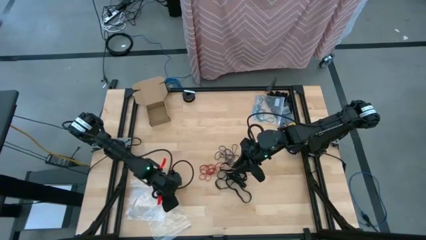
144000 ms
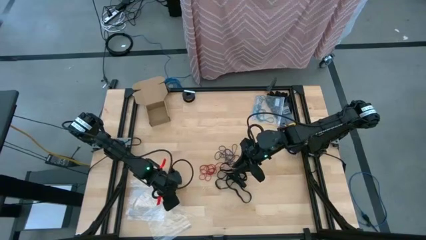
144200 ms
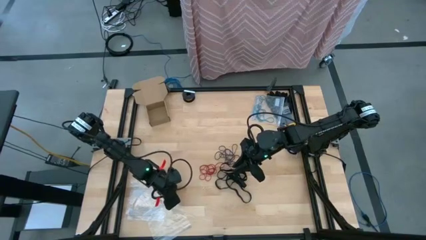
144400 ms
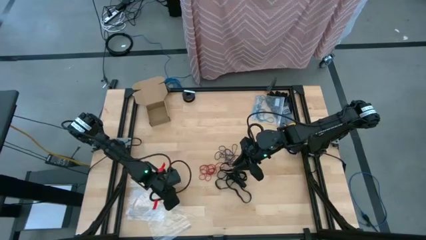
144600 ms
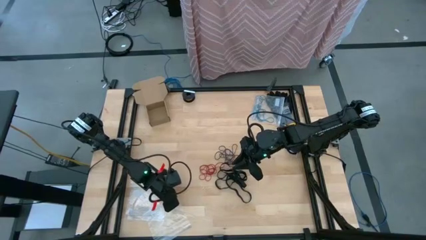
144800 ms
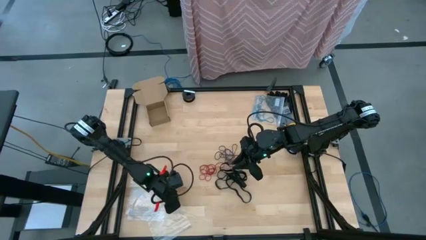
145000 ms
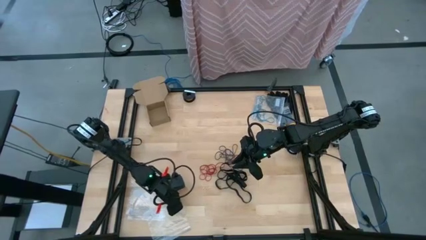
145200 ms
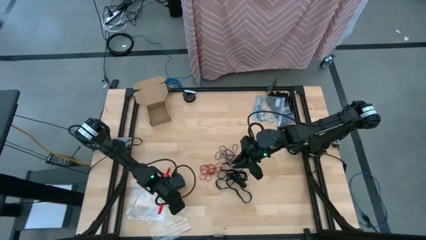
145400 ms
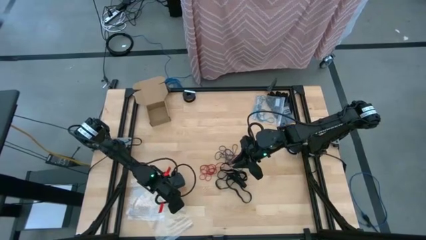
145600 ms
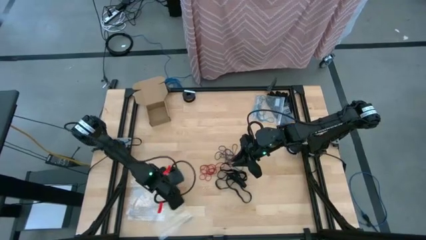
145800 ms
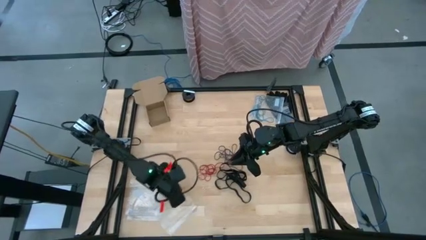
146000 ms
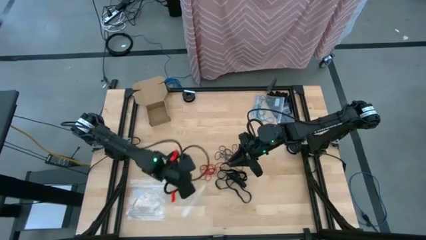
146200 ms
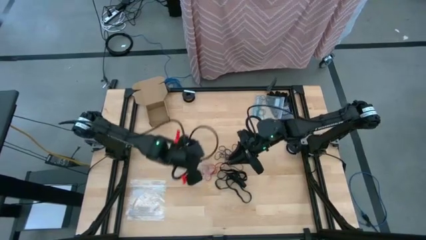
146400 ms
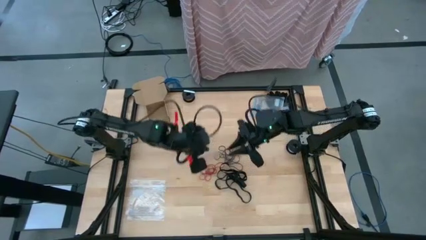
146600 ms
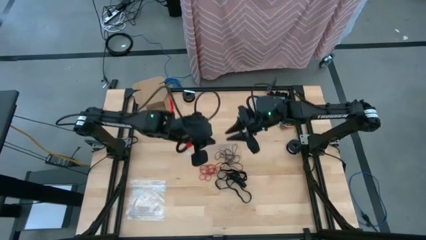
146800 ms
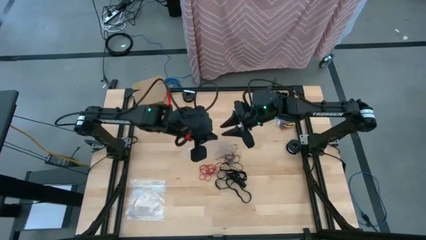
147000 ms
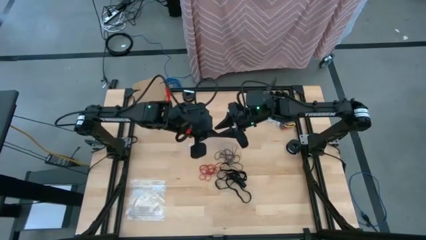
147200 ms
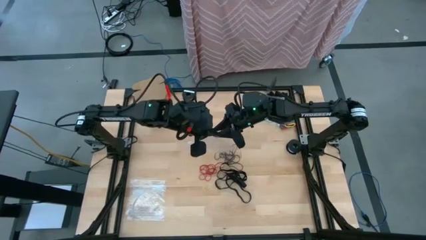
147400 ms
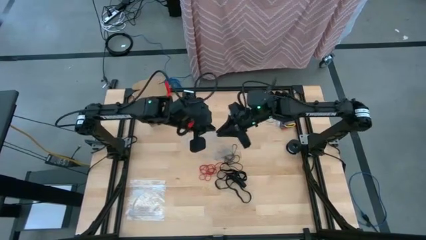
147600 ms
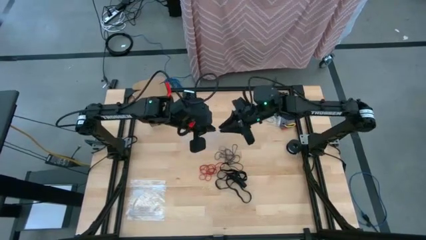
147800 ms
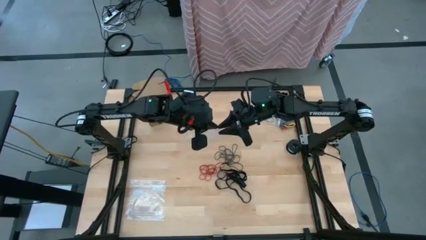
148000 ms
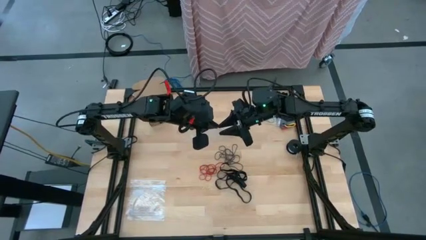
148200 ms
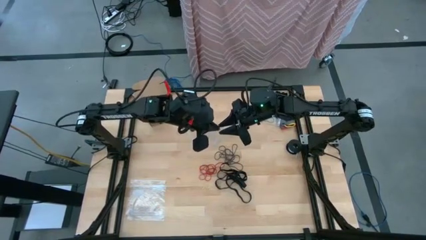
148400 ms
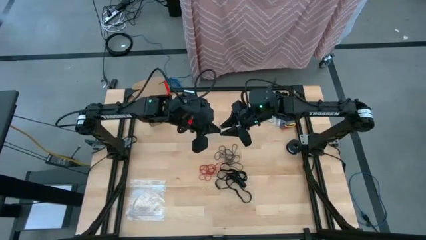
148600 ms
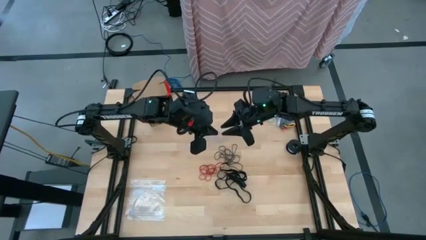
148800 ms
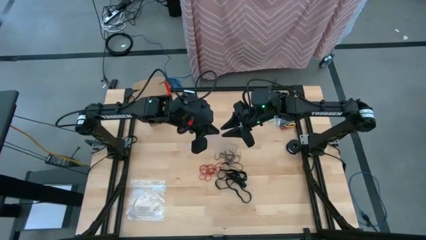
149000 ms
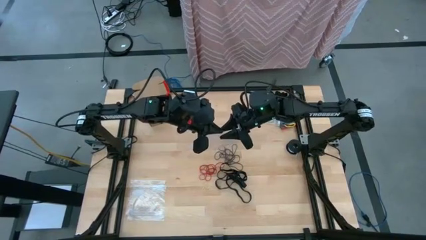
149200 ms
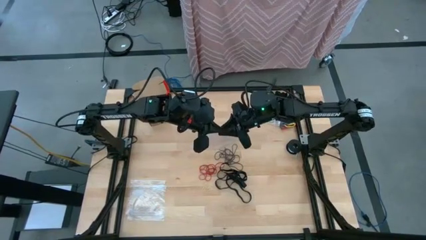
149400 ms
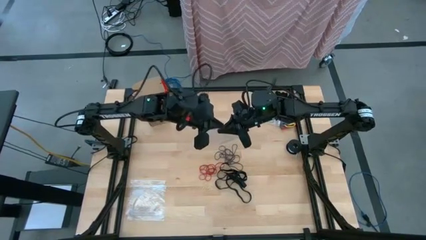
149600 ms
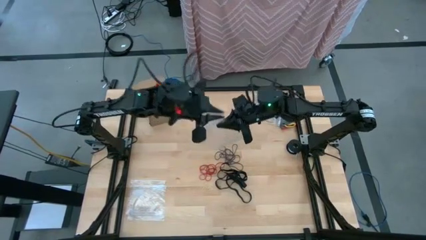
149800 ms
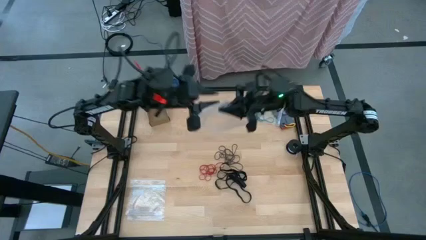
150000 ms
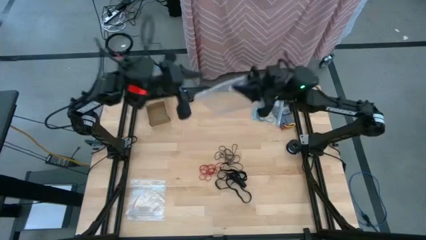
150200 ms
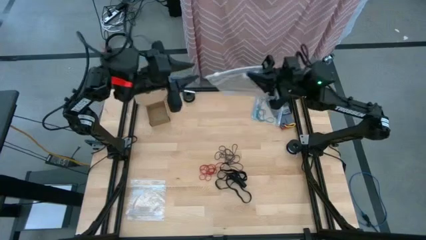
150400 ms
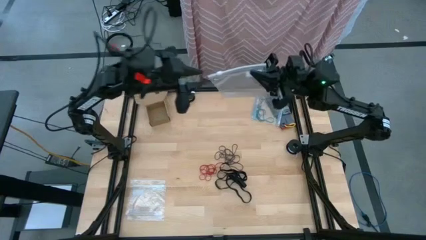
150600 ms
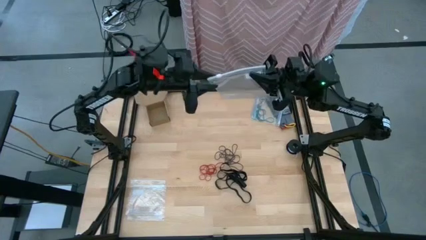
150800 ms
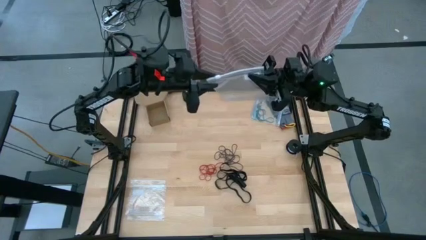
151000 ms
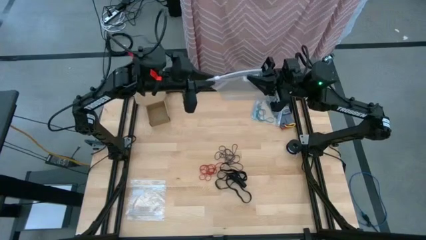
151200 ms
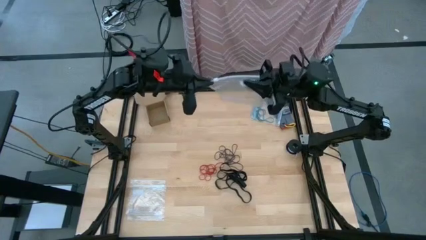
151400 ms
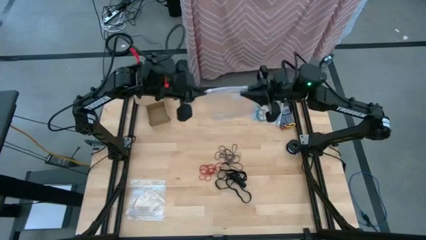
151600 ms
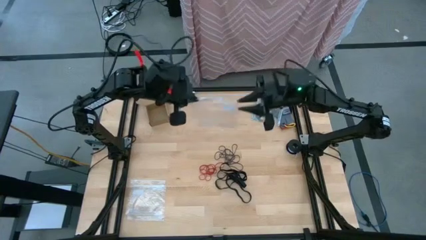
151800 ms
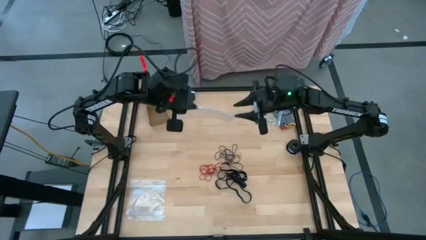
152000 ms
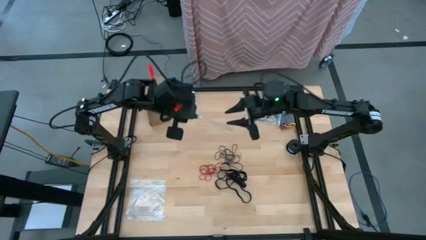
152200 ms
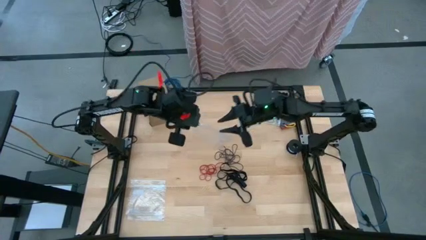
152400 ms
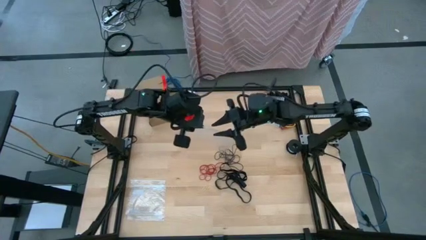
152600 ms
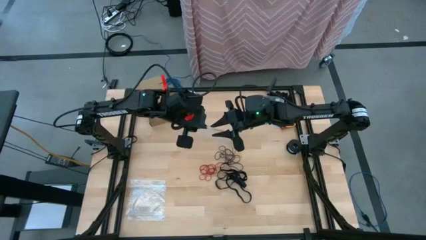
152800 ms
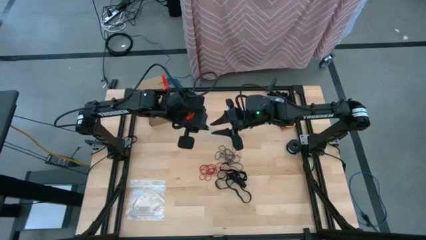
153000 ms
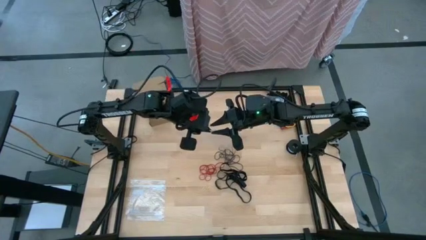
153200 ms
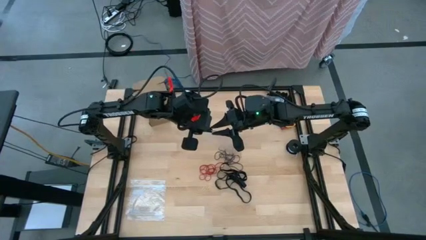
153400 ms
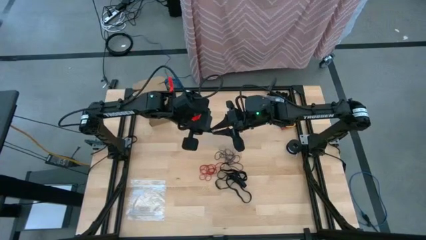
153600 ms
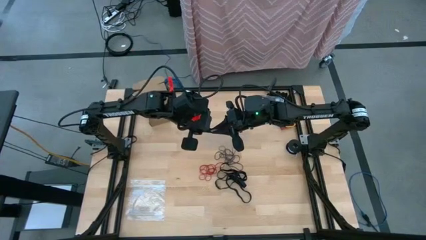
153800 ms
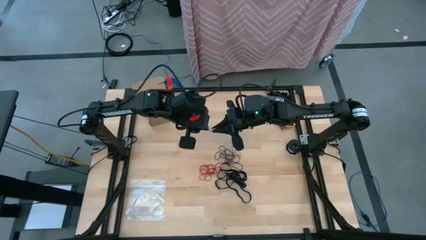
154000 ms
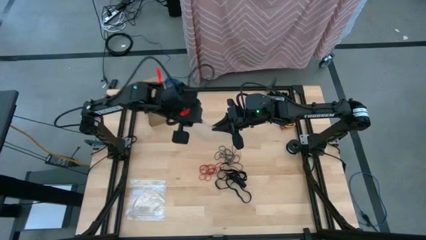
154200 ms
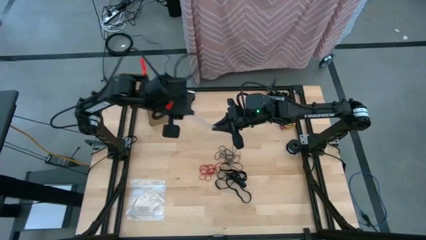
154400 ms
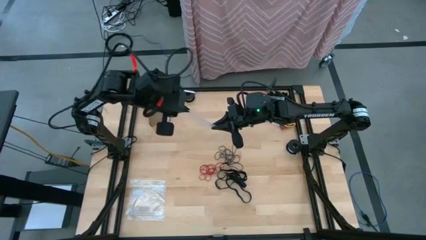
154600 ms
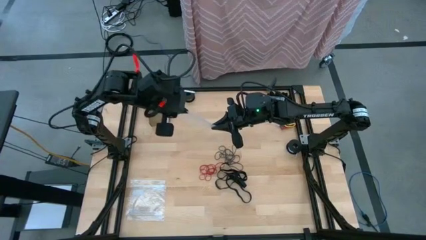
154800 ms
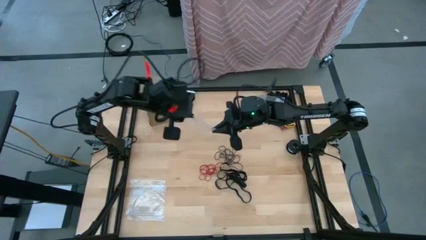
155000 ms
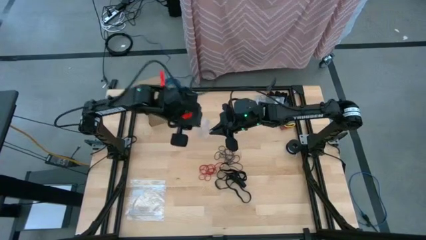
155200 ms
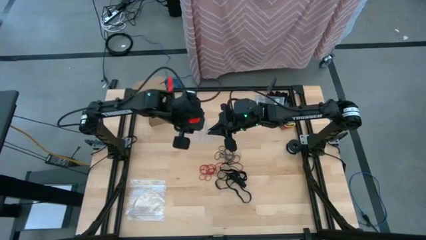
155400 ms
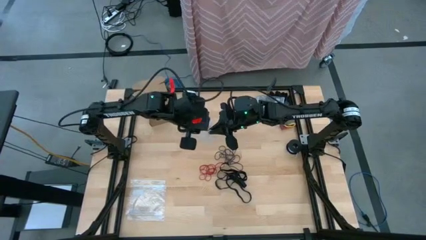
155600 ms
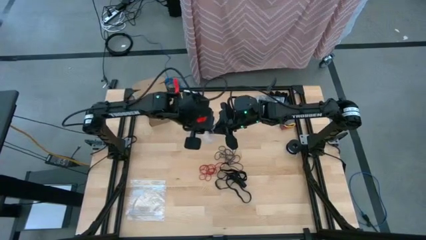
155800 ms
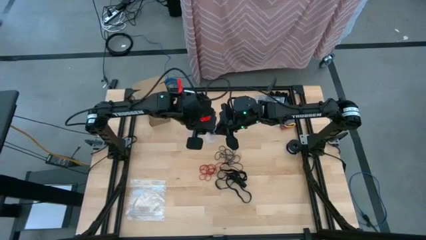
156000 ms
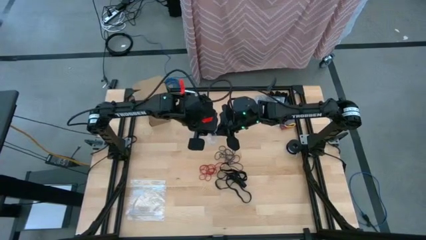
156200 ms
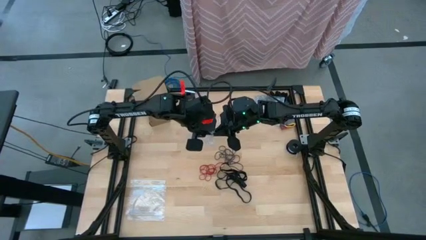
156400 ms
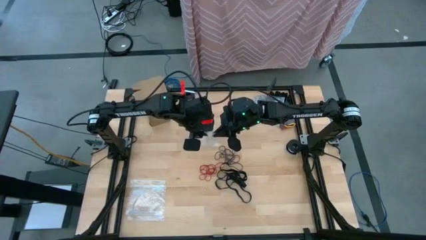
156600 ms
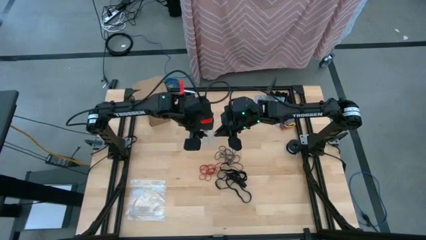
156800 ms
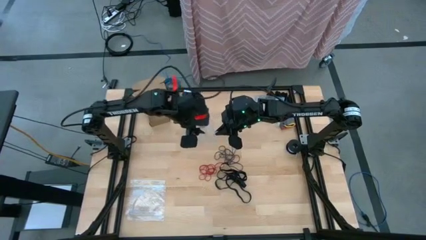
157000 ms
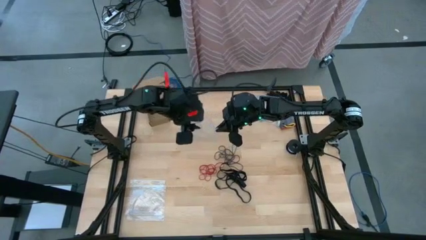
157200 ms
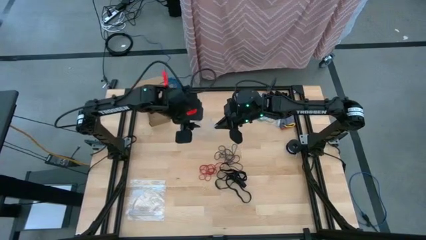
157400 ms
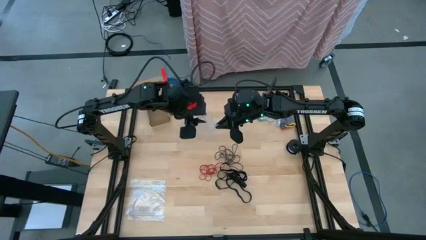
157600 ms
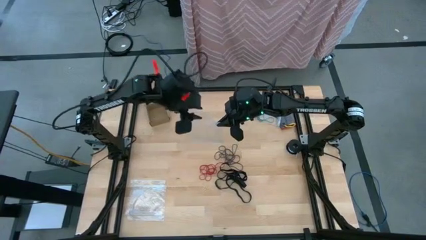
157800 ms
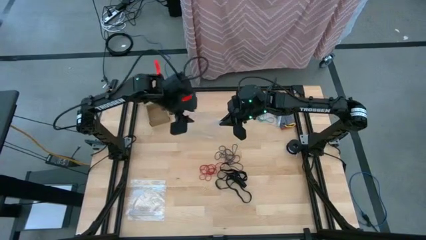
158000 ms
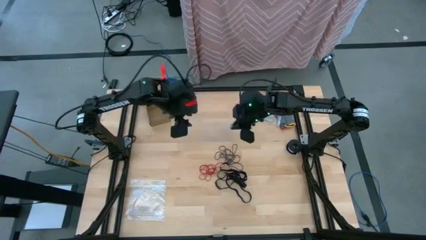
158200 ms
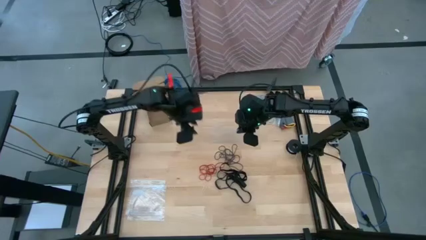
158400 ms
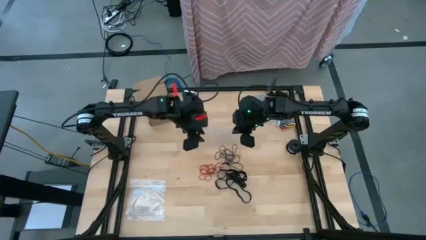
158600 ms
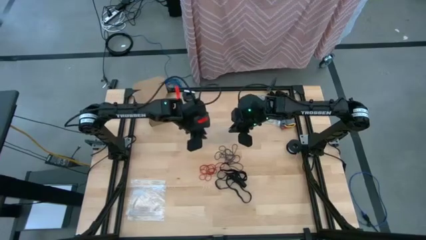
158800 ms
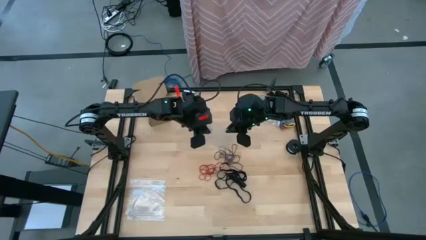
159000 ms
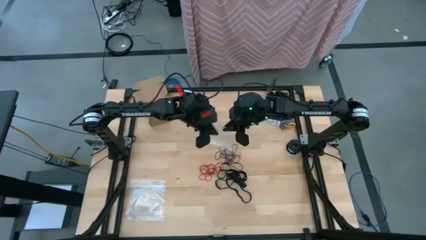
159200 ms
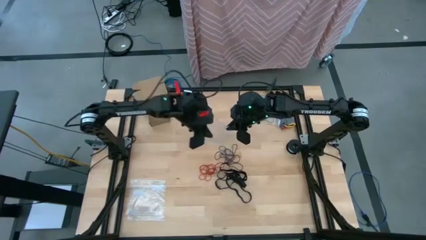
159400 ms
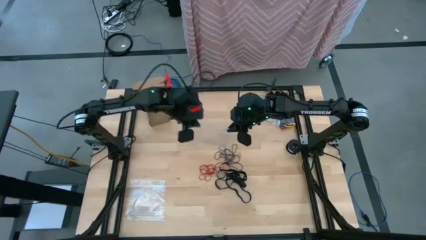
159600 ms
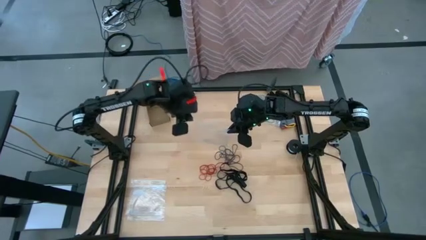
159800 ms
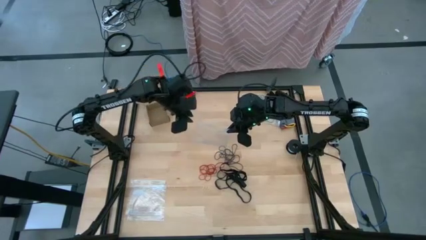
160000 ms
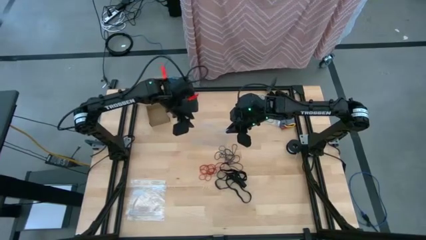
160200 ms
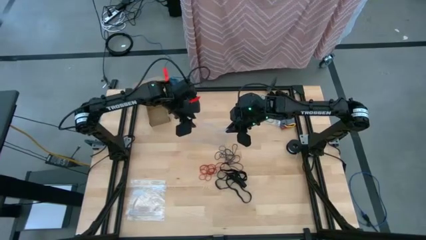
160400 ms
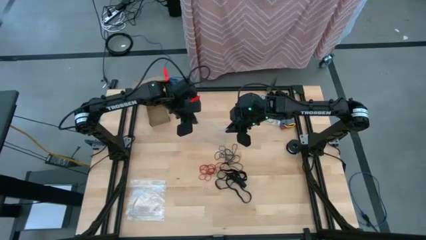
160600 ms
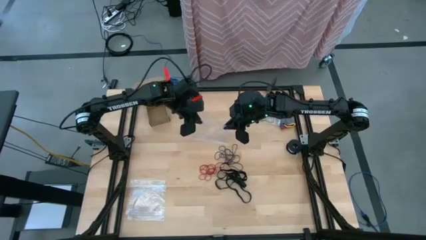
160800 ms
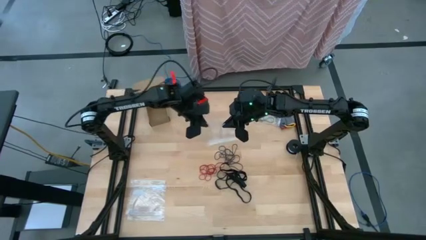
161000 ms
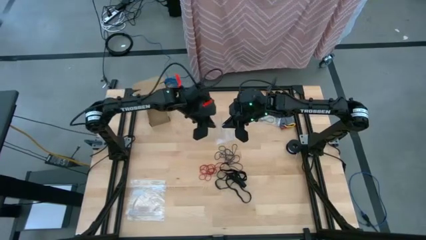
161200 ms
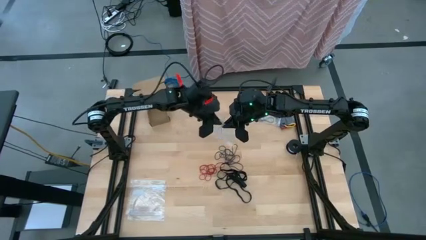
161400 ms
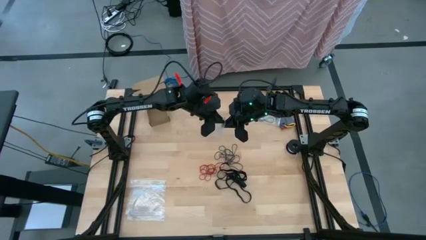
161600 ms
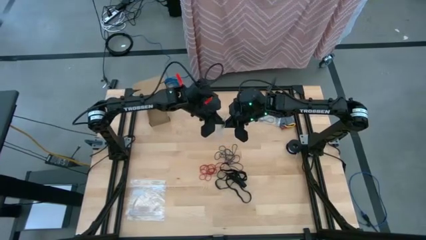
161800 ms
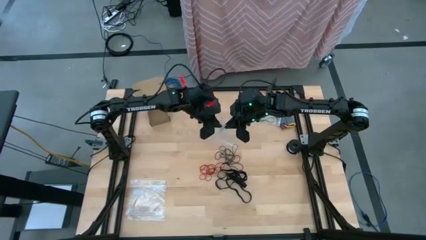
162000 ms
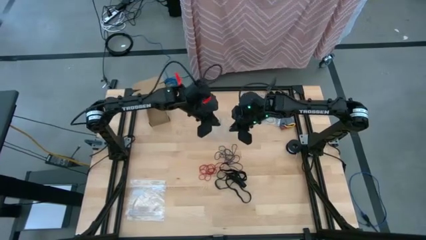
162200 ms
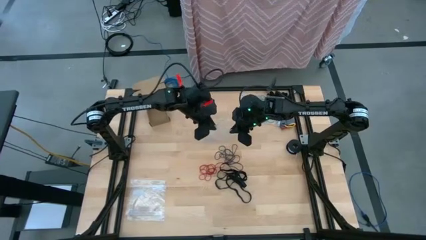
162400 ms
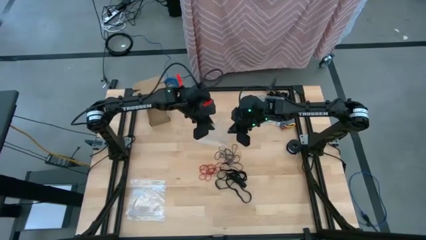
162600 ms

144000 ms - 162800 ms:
Task: Sort rubber bands
Open the transparent zip bag
